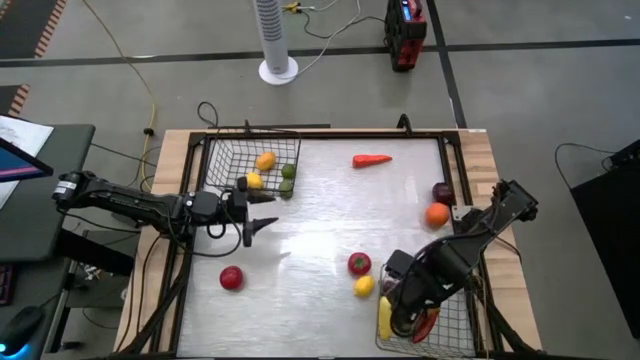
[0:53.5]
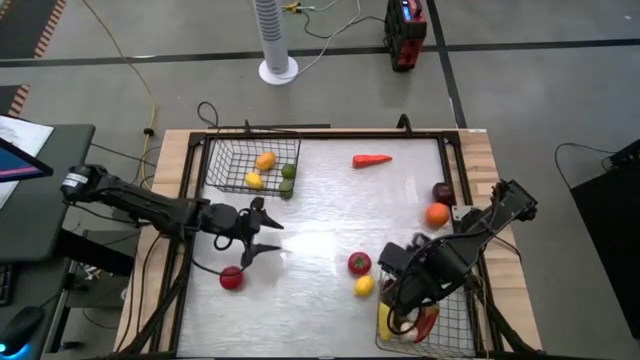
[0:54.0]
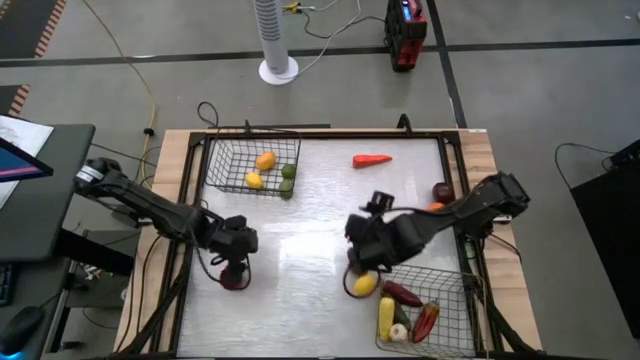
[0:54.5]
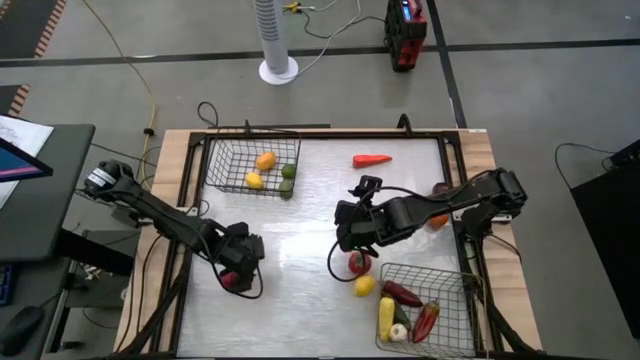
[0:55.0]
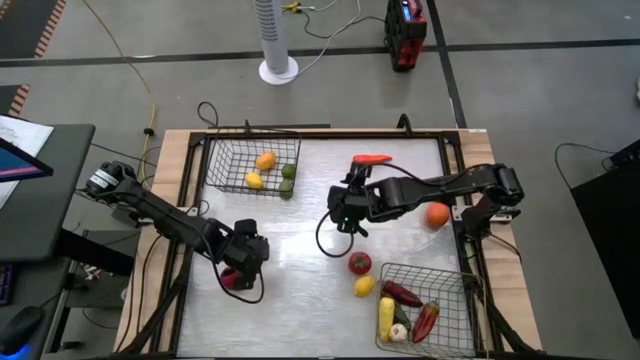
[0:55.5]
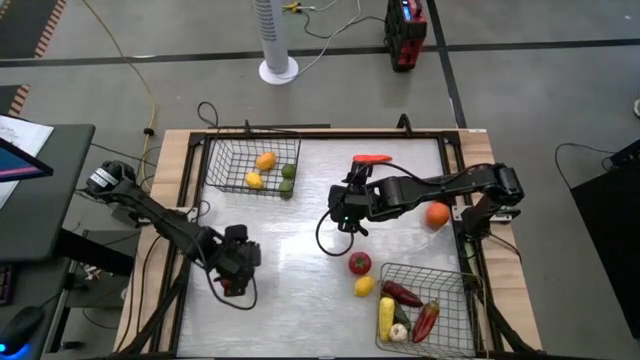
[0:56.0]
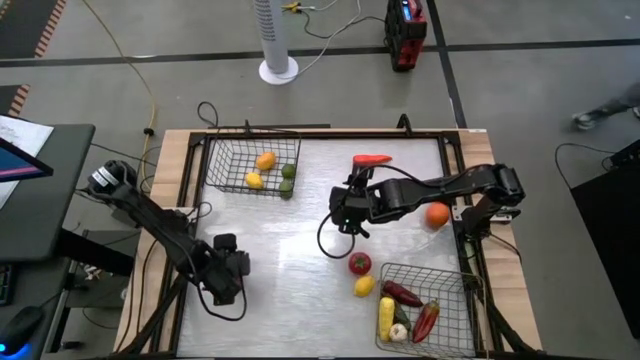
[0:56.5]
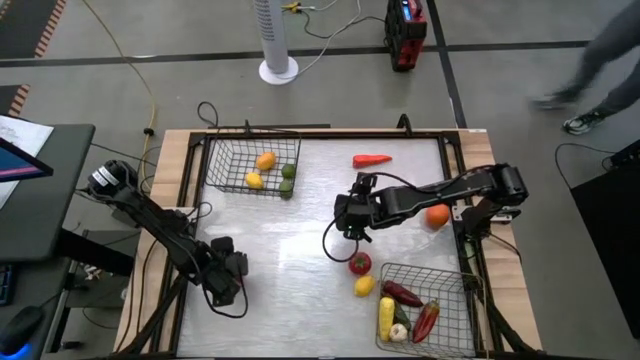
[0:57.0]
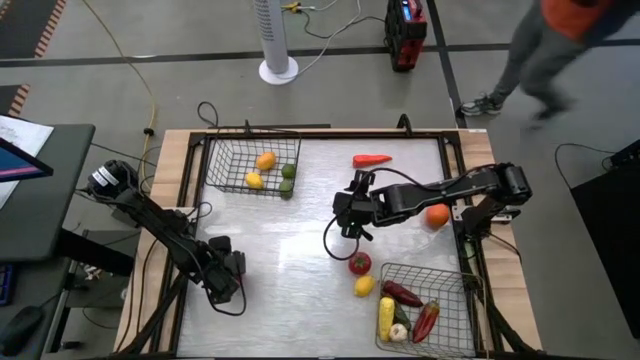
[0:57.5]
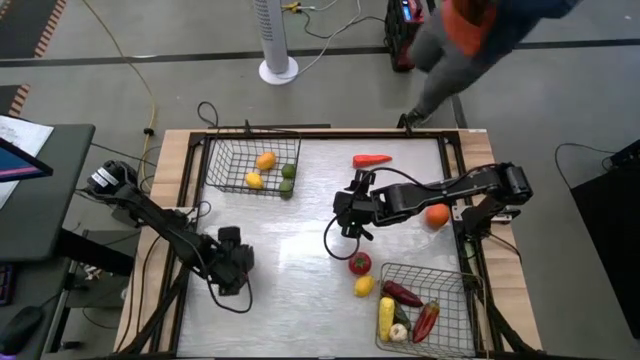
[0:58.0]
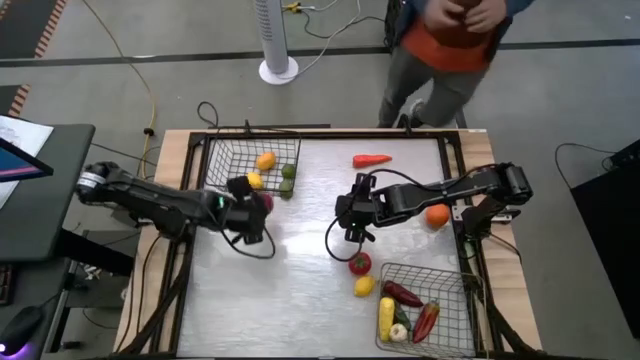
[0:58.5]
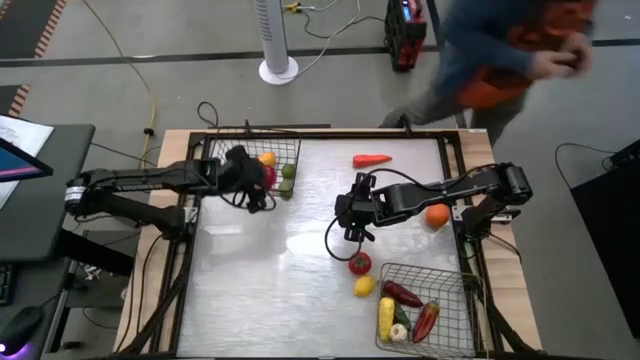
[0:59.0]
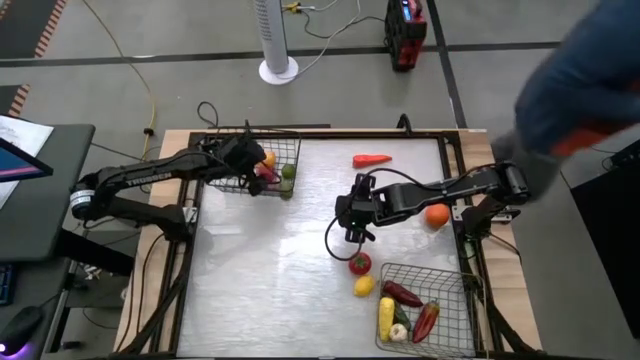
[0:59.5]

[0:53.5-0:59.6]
Task: Sort produce into baskets
Put the left tomato into the black wire basket

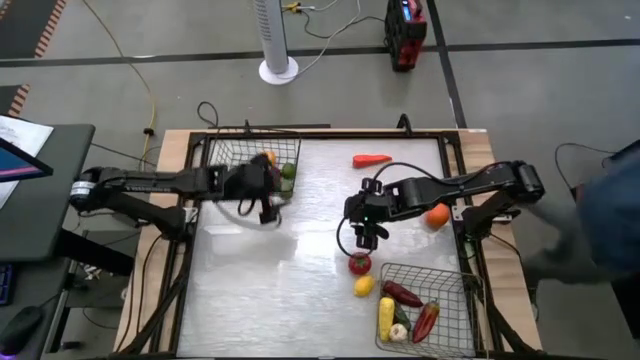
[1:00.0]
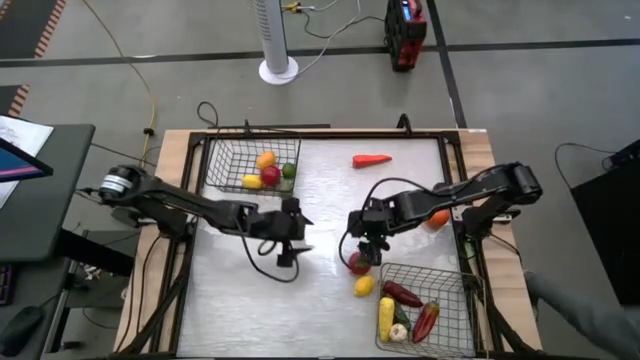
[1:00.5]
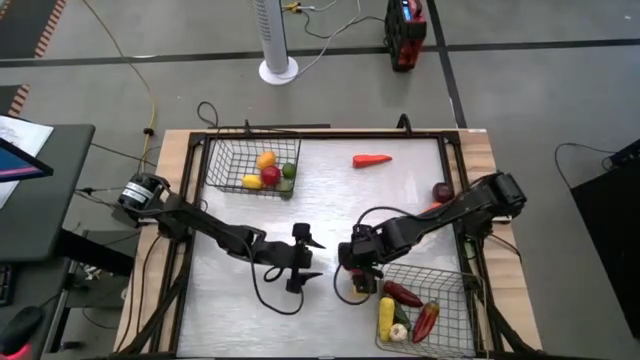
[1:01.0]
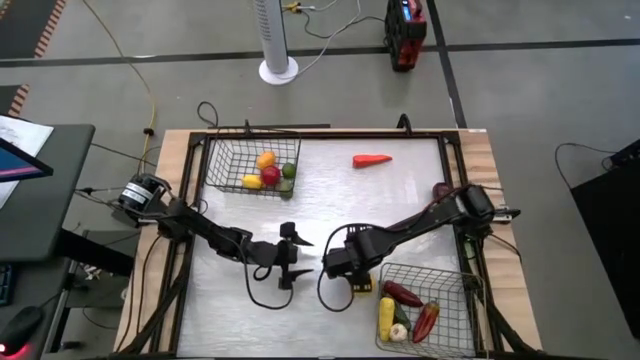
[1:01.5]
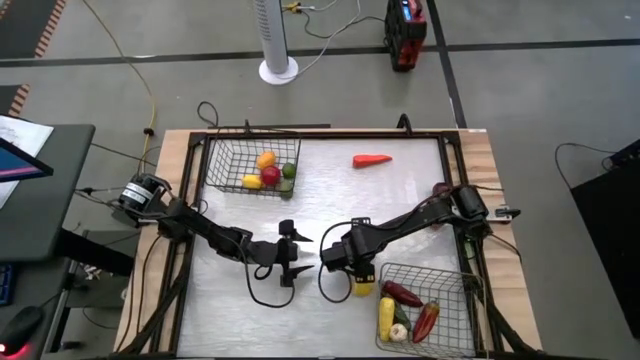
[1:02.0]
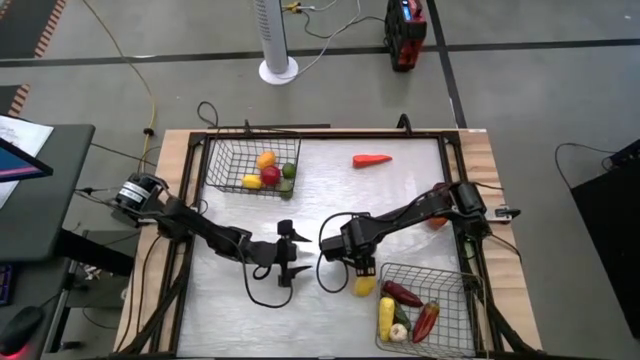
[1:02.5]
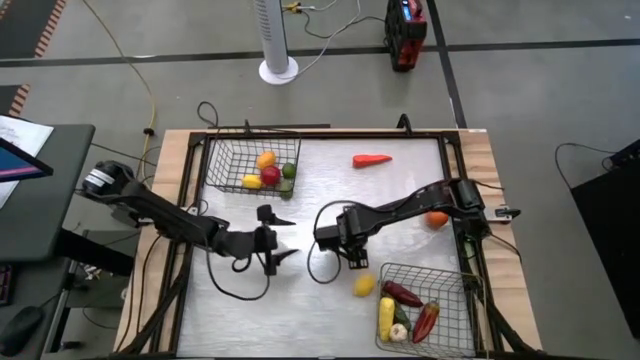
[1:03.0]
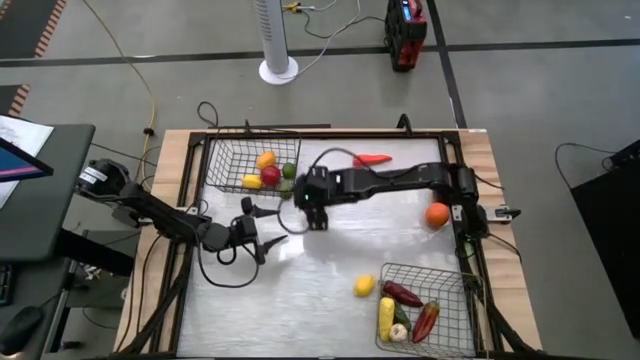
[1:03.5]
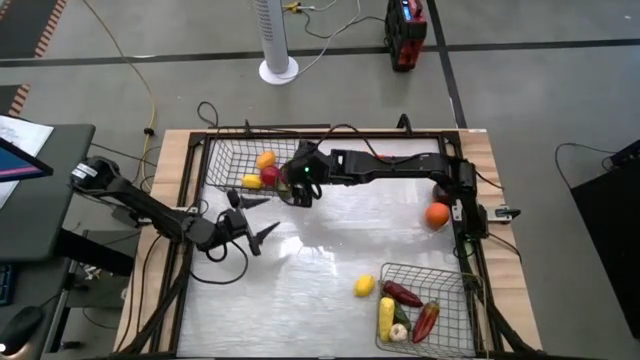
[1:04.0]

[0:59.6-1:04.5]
Put the tomato into the black wire basket

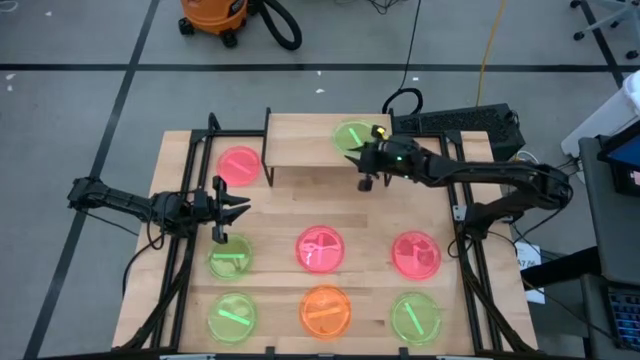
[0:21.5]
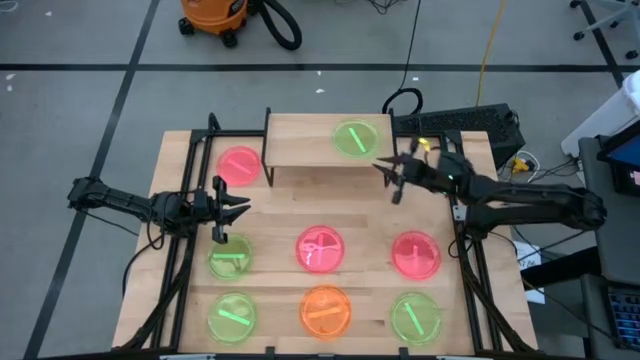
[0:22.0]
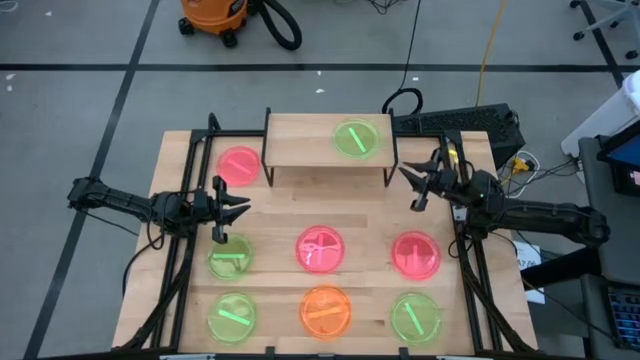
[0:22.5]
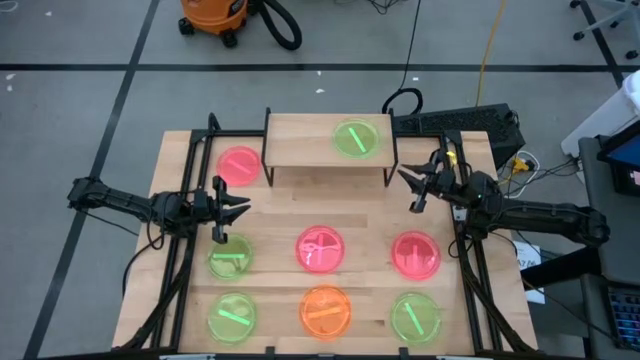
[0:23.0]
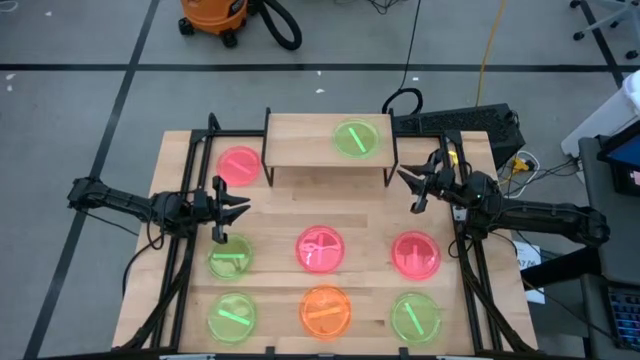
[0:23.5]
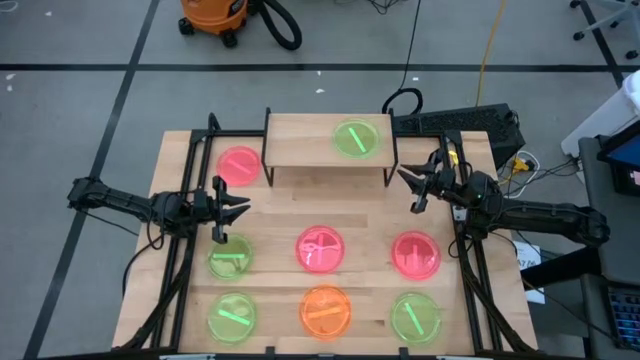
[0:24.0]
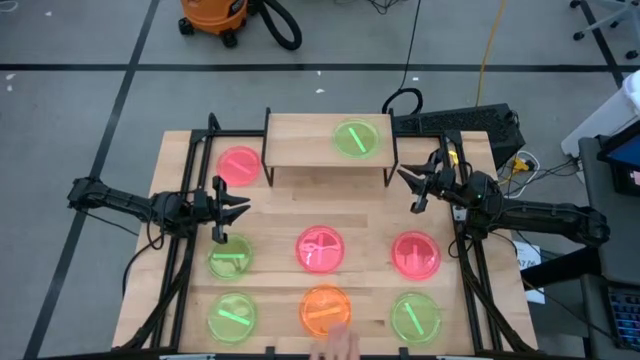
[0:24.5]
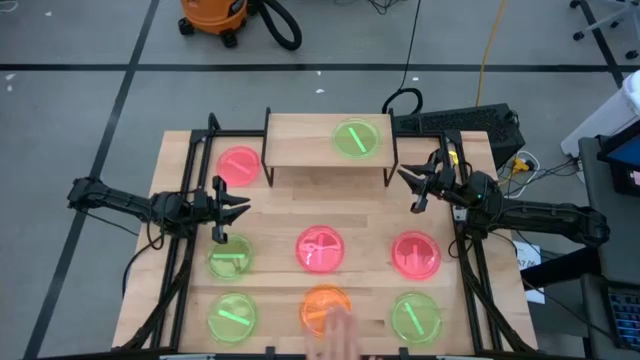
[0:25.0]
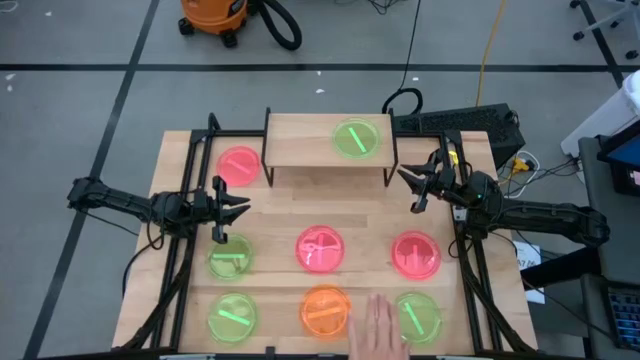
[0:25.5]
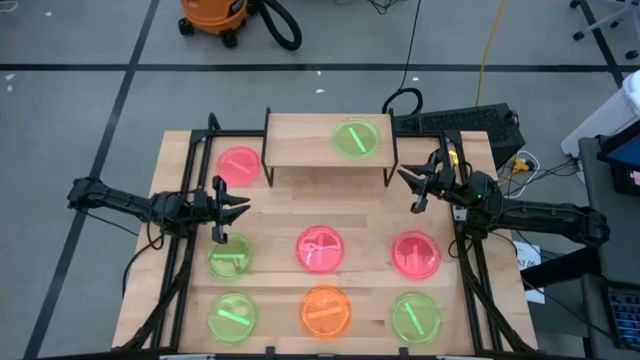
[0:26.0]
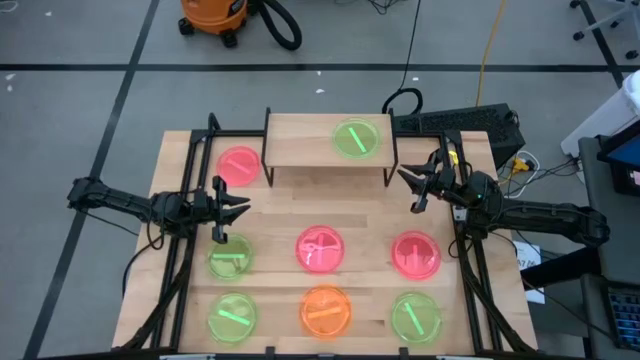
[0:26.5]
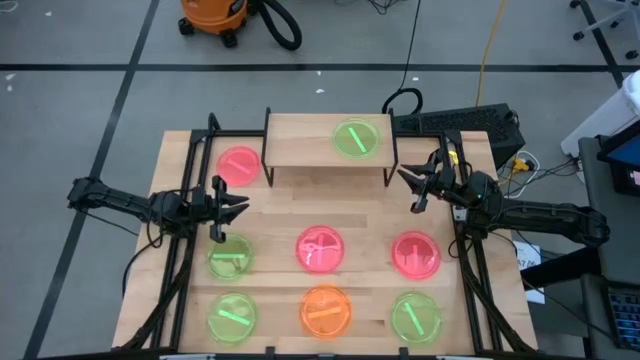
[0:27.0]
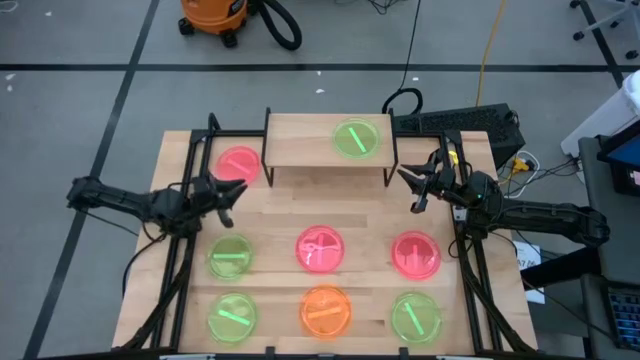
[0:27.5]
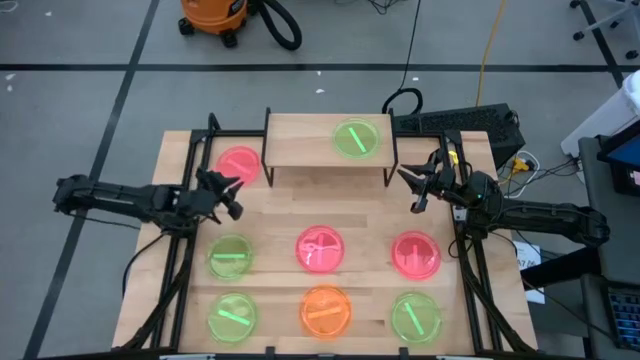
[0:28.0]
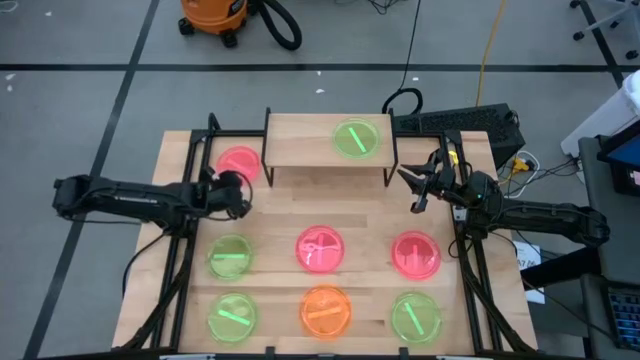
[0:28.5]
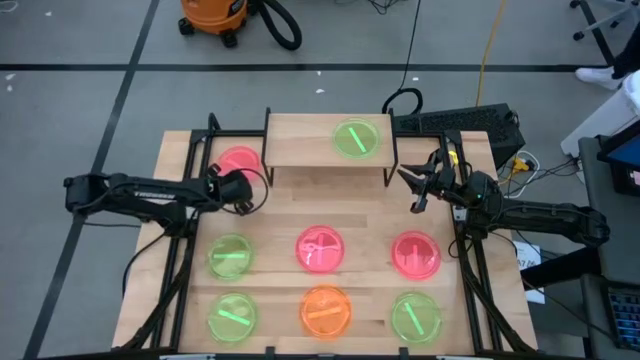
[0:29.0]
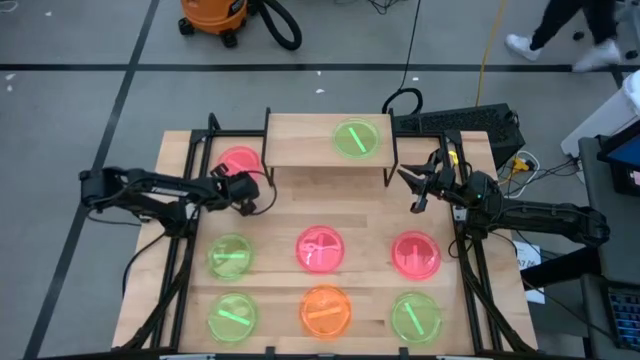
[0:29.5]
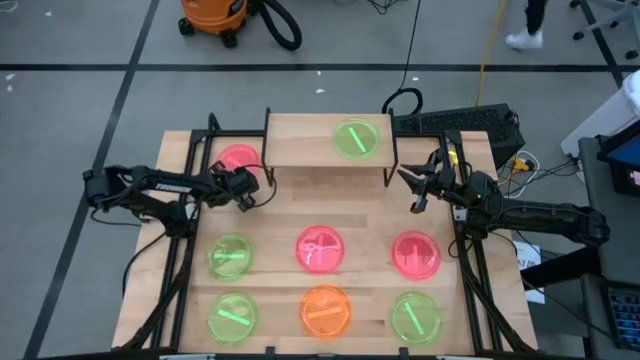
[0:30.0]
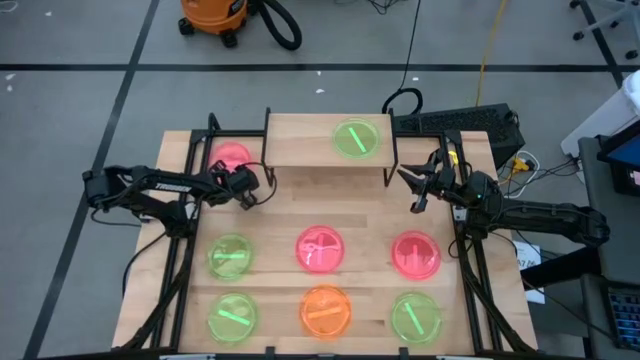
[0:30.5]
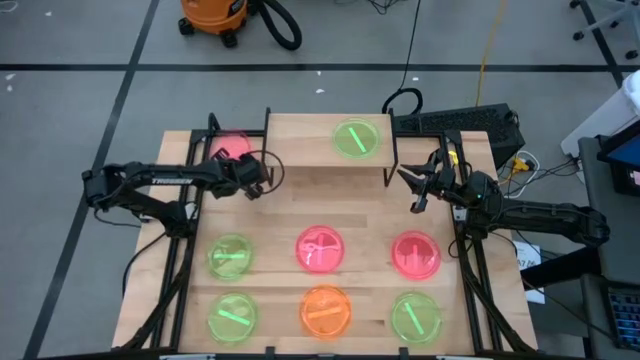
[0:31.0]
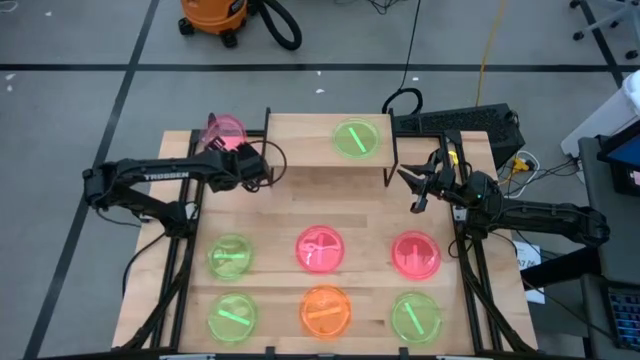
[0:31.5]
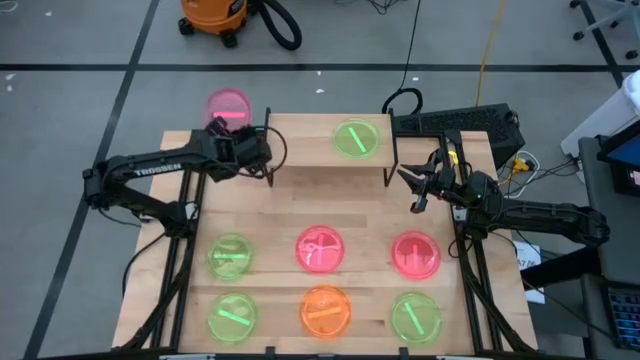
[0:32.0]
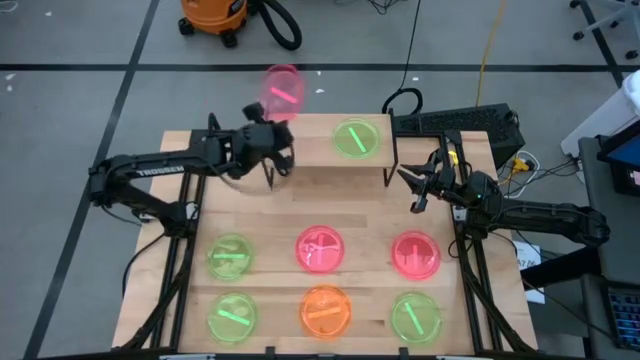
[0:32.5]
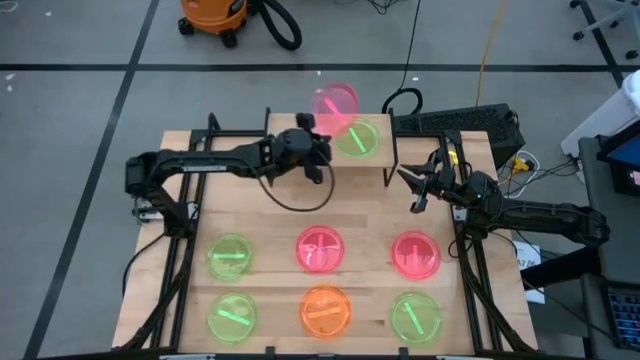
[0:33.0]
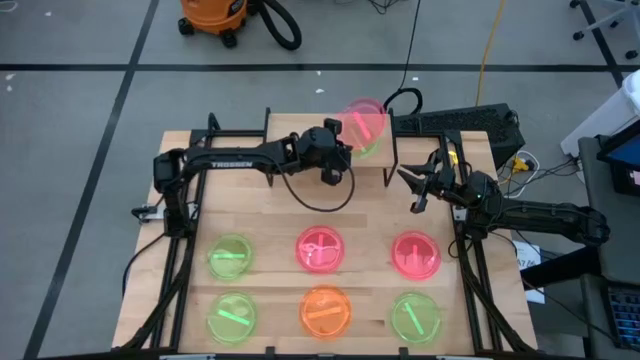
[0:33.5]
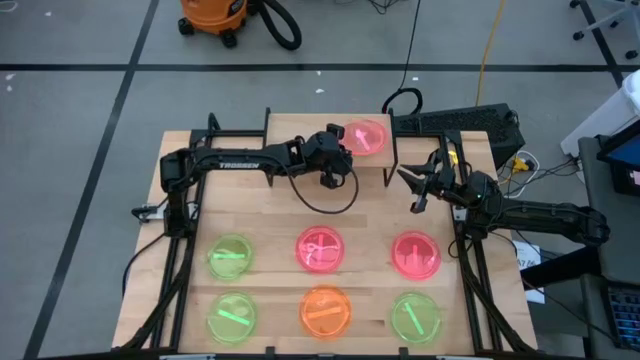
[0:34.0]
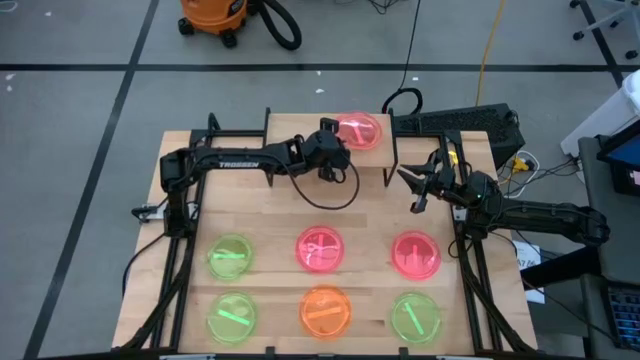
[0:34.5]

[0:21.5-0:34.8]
Task: Place and stack plates onto a shelf
Stack the pink plate on top of the green plate on the shelf
